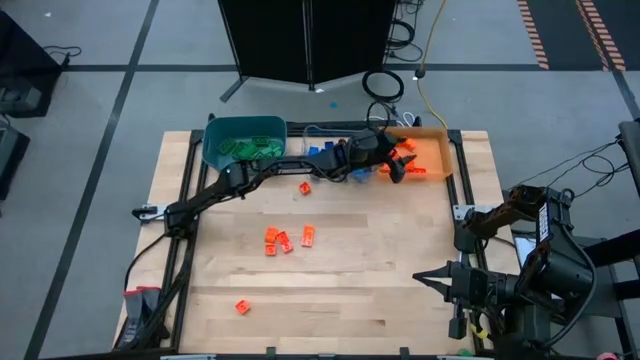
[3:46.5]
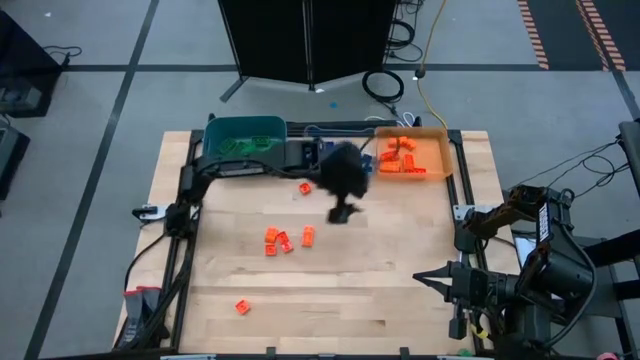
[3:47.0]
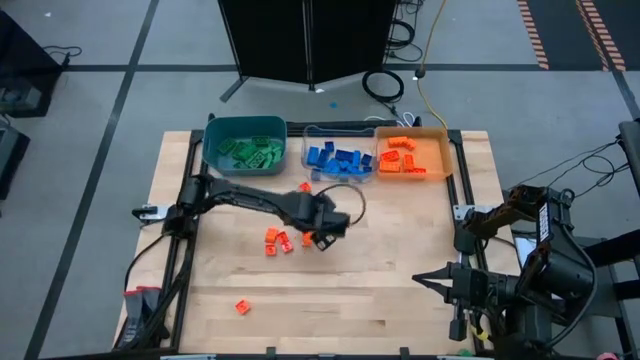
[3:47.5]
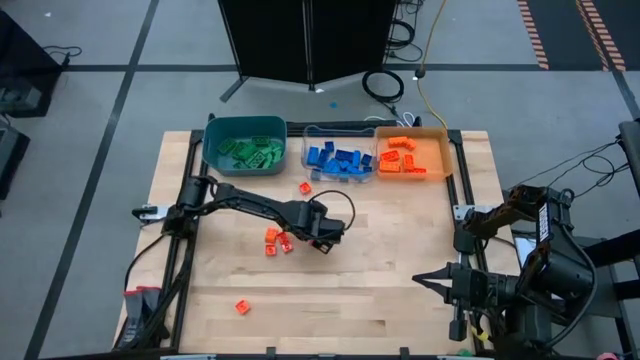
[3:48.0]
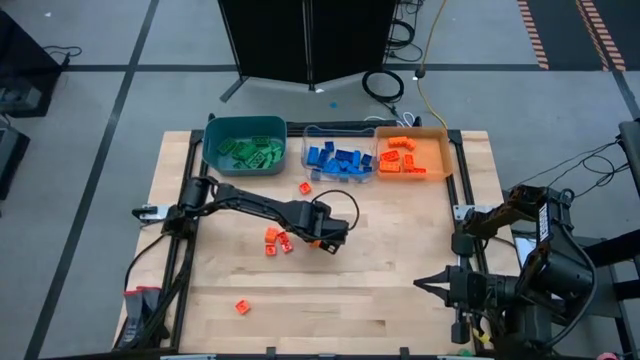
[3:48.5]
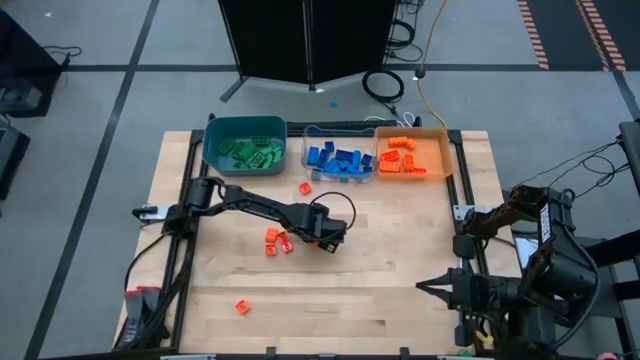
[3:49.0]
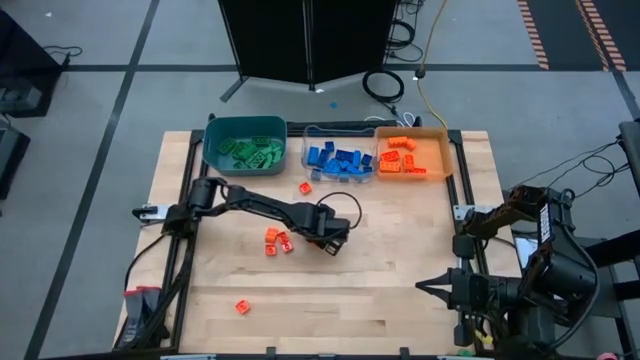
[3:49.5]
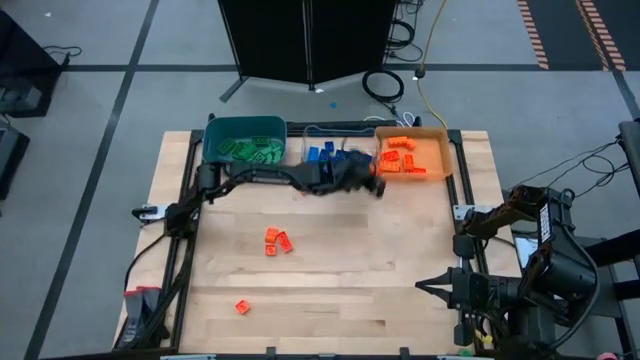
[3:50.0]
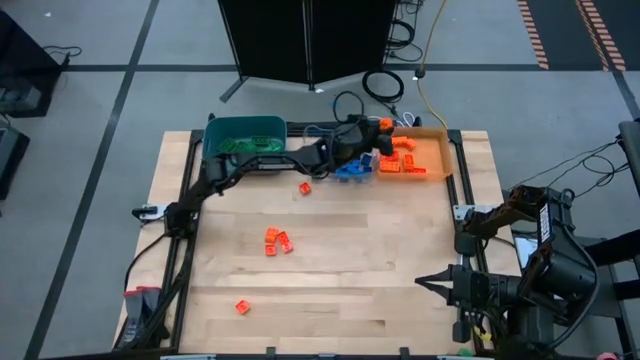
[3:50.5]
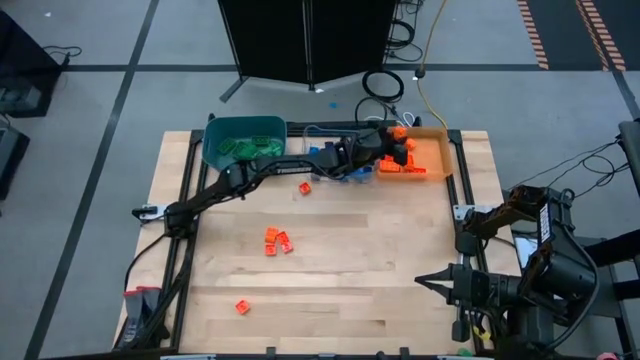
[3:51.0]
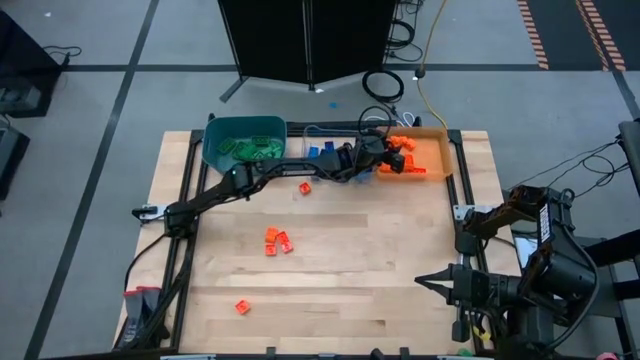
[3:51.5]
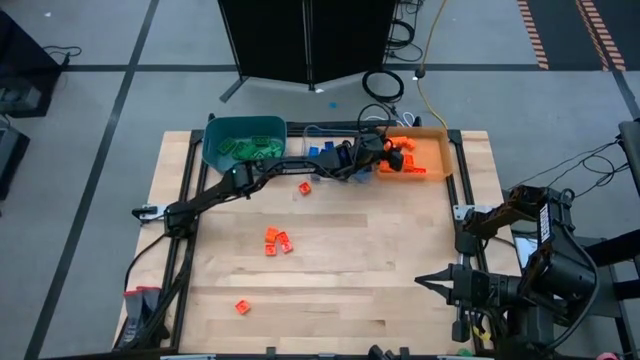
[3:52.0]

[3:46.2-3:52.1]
Task: Sort blocks
Put the orange game piece into the orange transparent bin

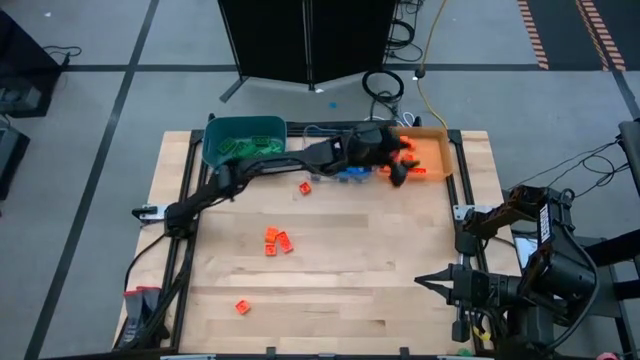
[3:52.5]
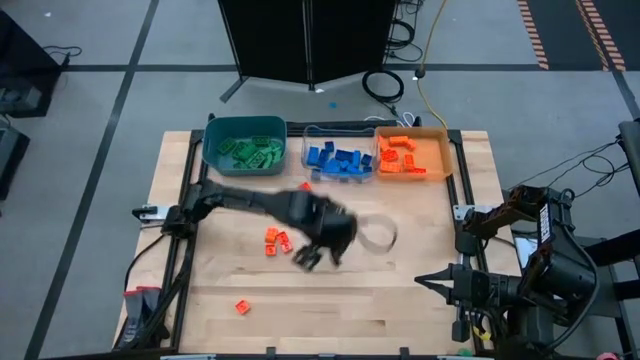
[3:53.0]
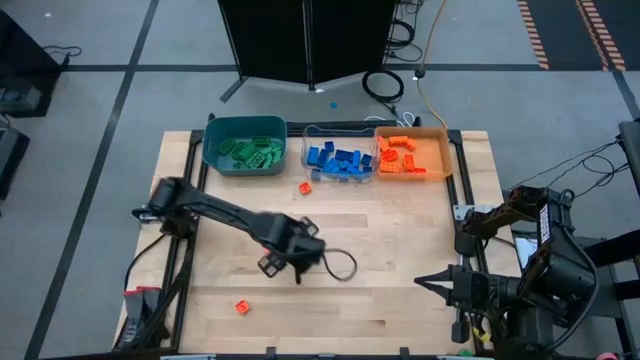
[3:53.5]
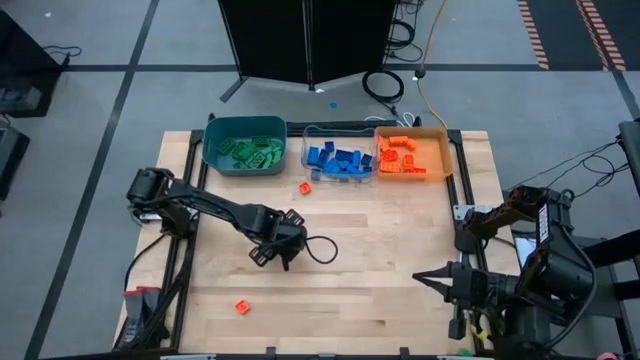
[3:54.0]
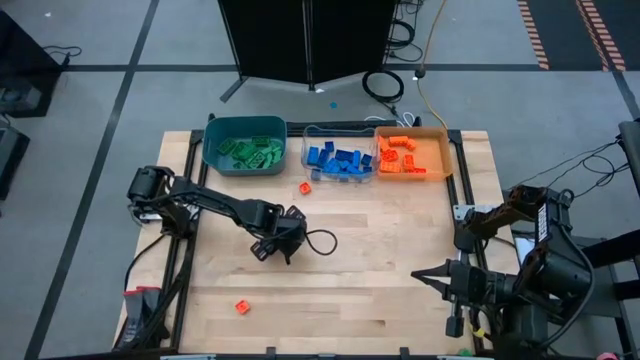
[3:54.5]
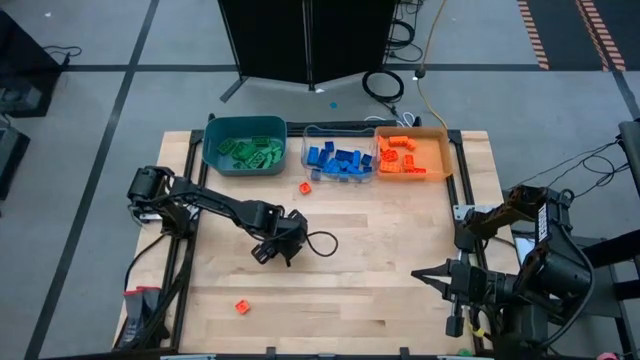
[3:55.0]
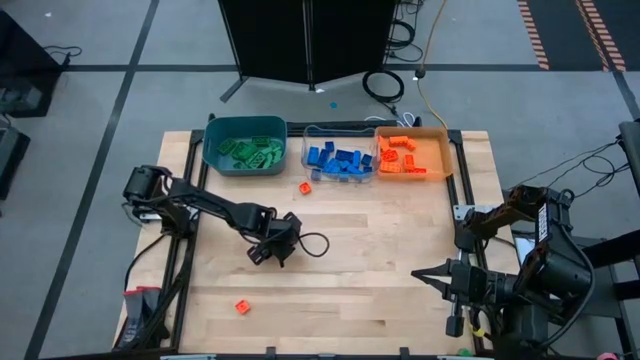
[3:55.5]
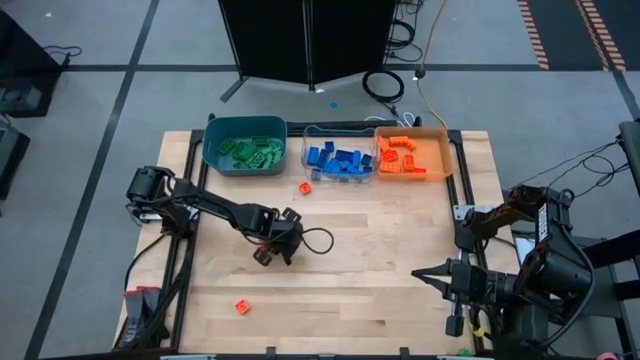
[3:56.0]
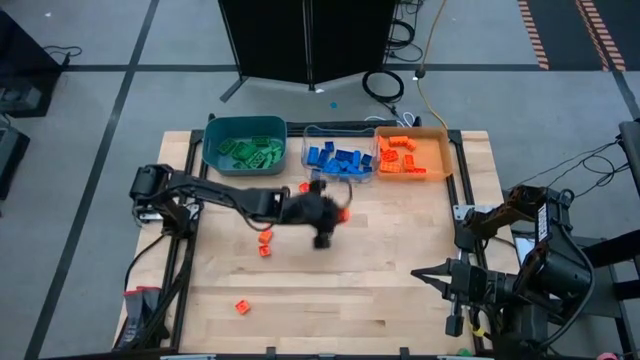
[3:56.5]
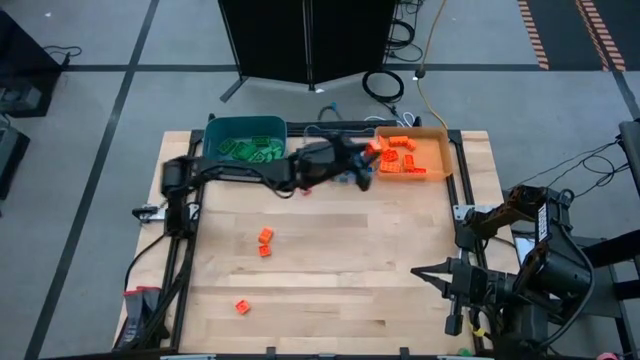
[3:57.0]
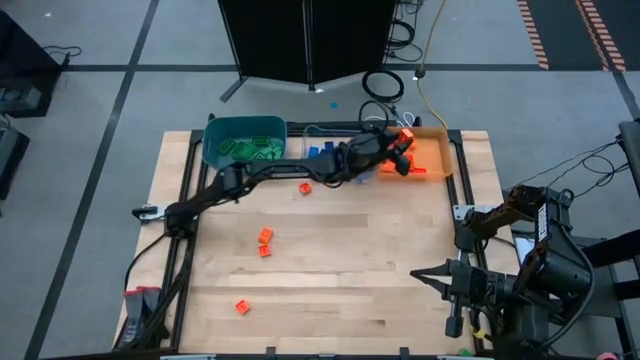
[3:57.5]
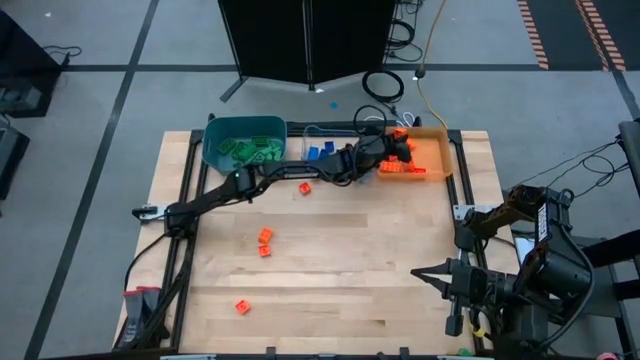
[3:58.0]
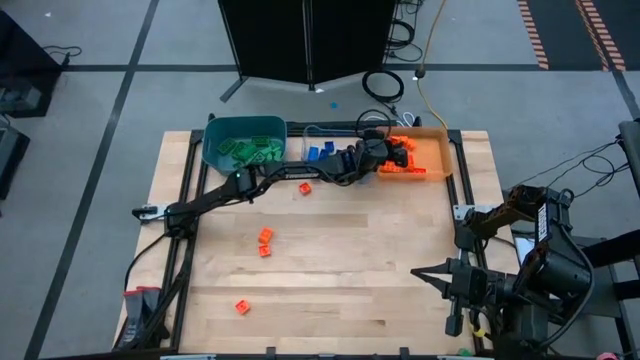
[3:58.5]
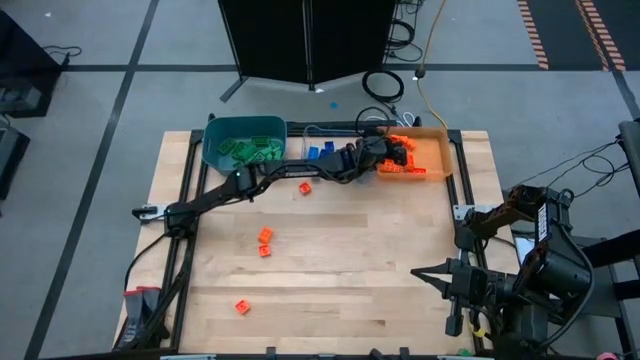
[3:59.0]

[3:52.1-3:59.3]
Put the orange game piece into the orange transparent bin

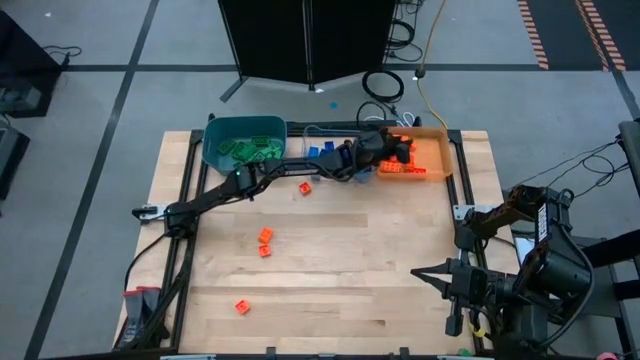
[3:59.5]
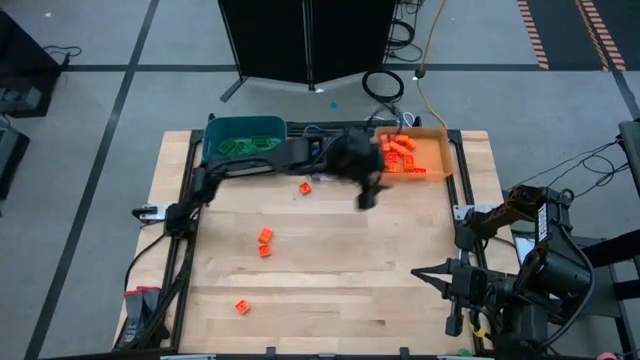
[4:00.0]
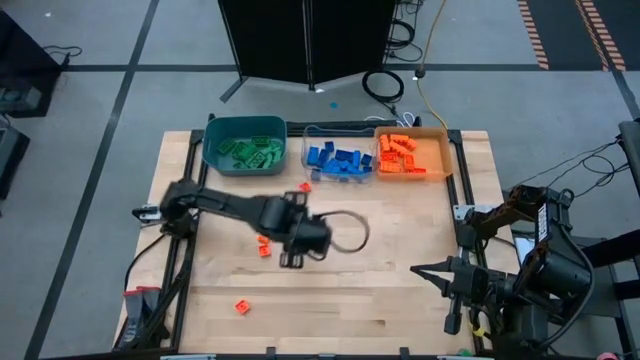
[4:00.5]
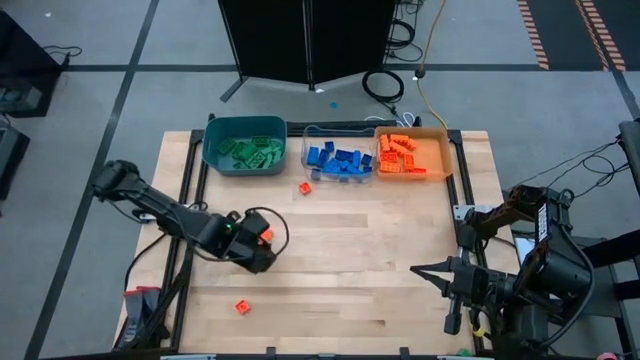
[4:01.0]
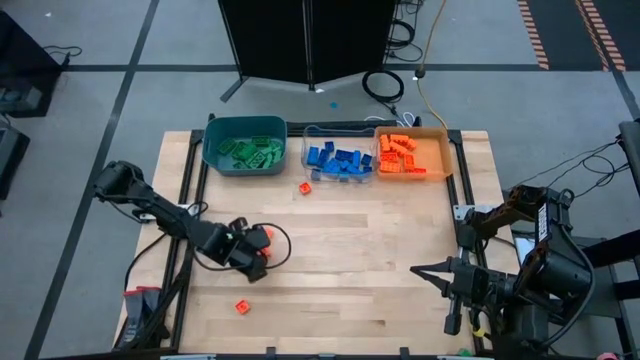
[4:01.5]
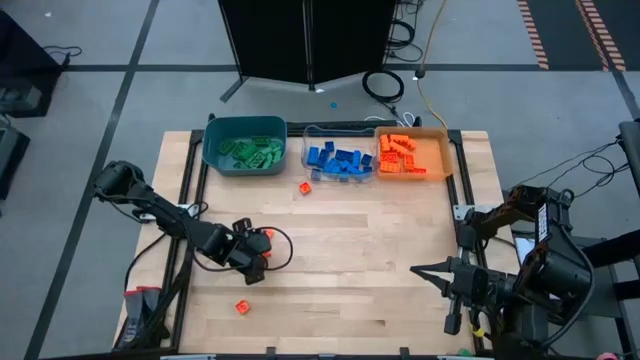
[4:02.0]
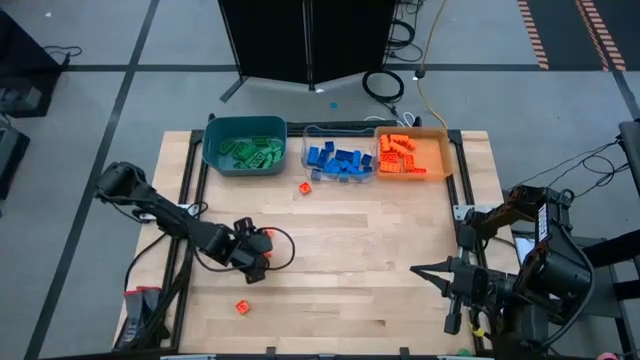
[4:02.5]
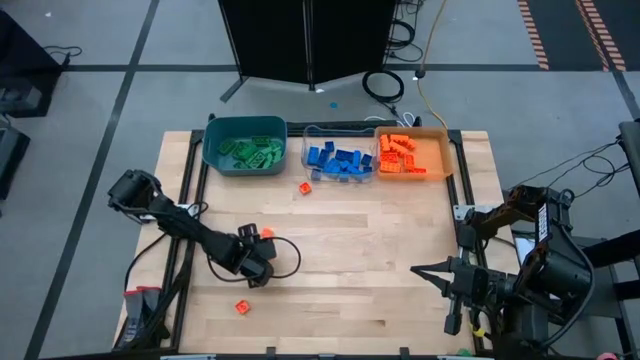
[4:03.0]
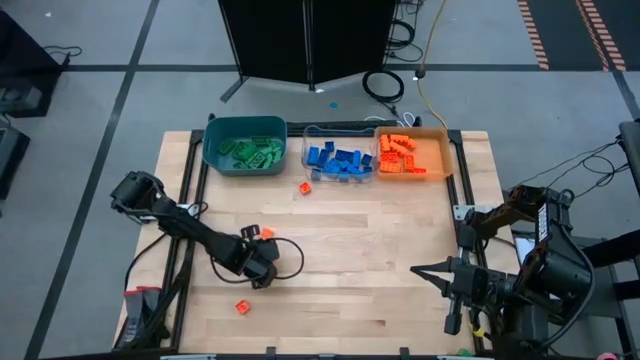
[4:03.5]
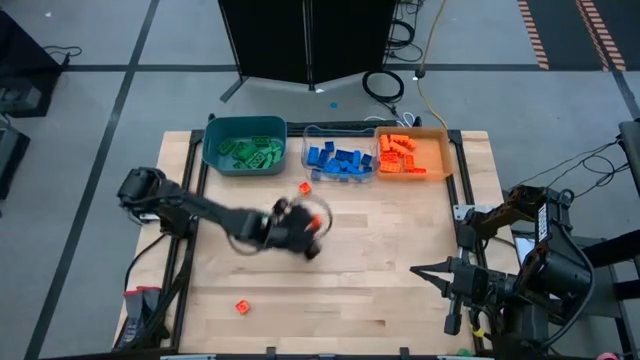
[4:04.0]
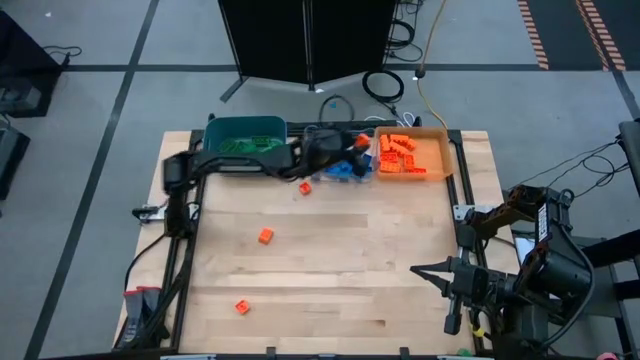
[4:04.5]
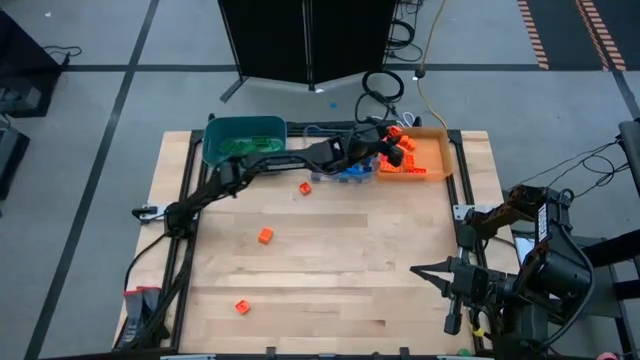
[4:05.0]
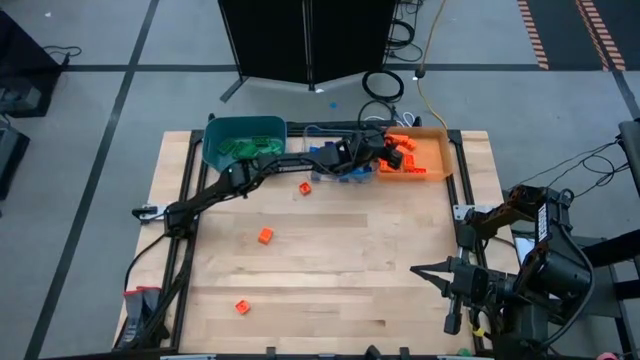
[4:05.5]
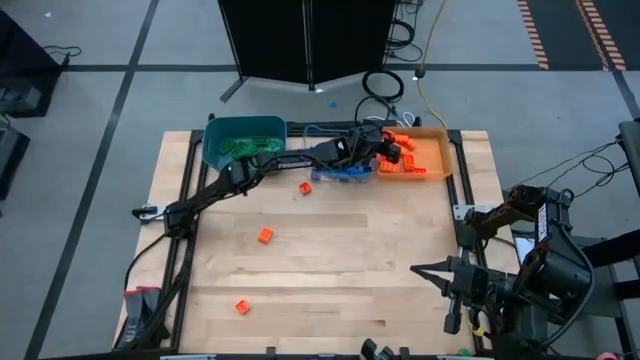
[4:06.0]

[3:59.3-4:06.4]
Put the orange game piece into the orange transparent bin
